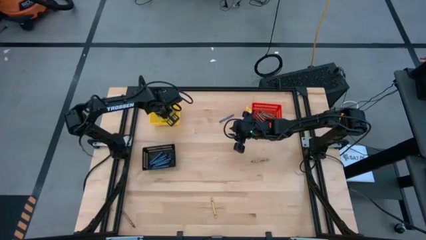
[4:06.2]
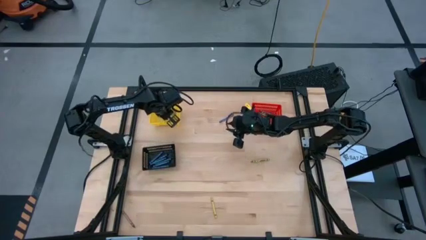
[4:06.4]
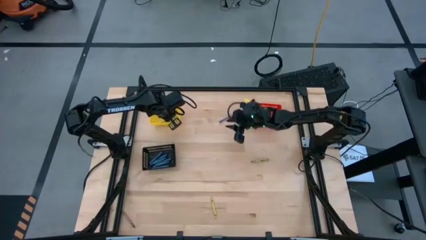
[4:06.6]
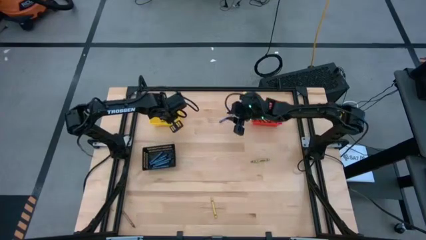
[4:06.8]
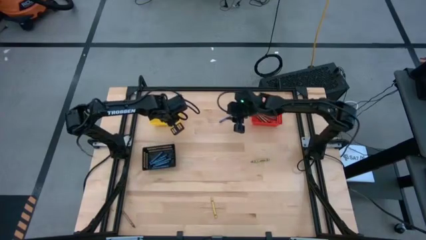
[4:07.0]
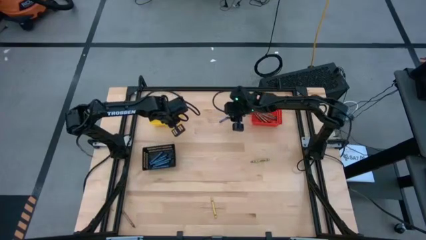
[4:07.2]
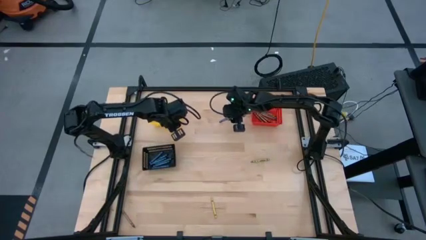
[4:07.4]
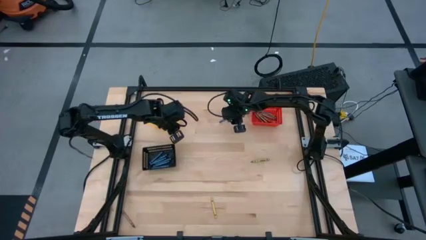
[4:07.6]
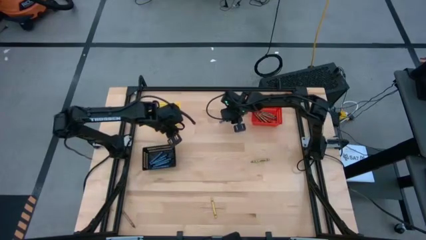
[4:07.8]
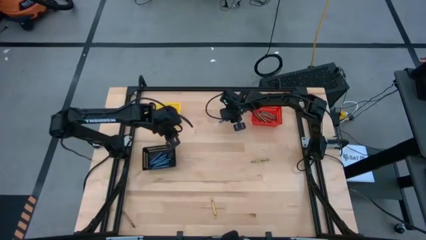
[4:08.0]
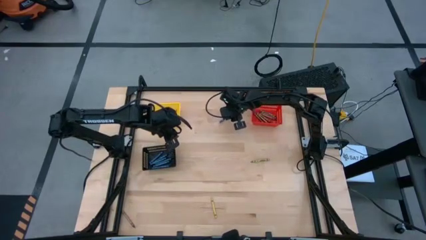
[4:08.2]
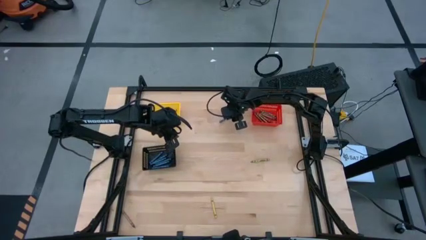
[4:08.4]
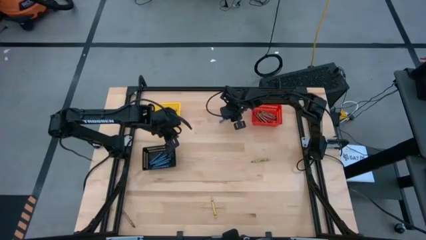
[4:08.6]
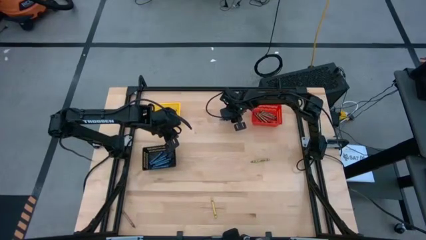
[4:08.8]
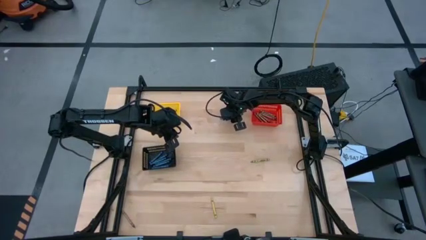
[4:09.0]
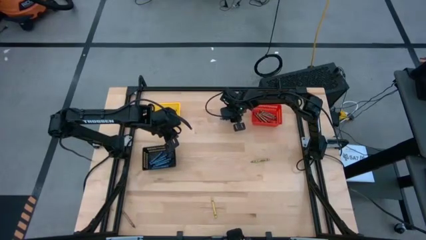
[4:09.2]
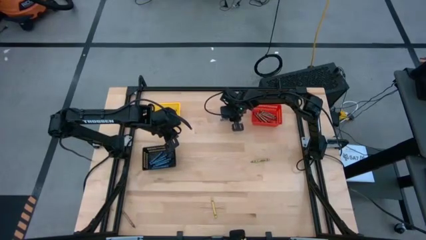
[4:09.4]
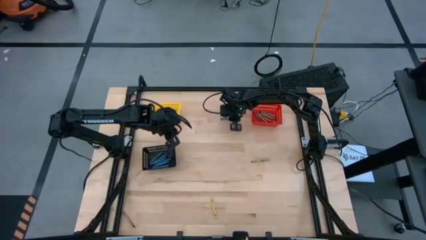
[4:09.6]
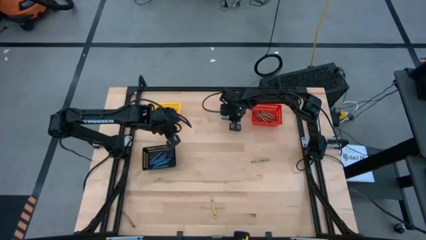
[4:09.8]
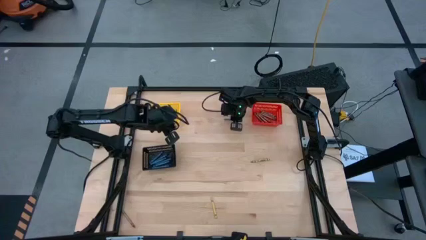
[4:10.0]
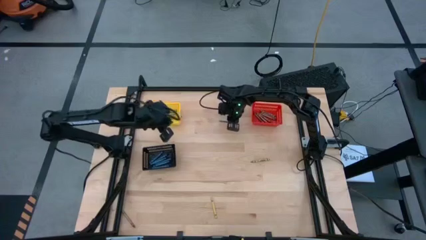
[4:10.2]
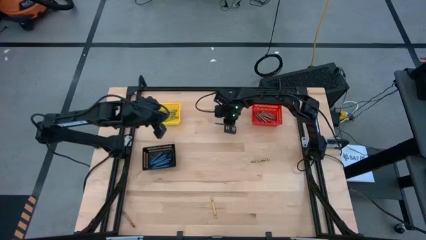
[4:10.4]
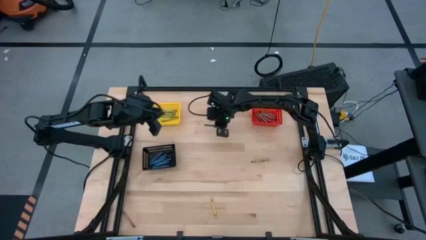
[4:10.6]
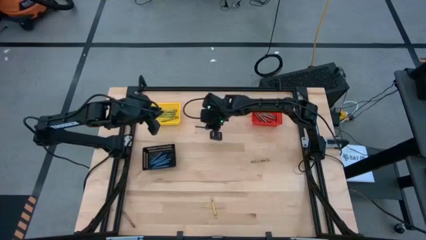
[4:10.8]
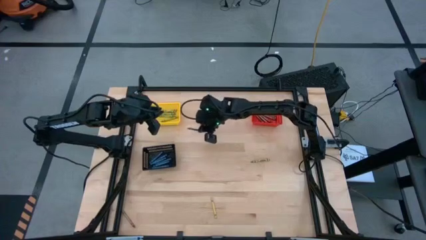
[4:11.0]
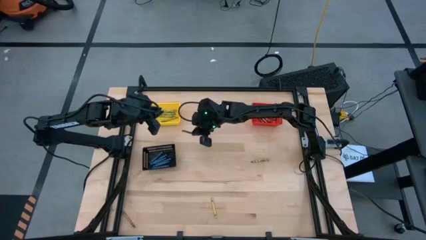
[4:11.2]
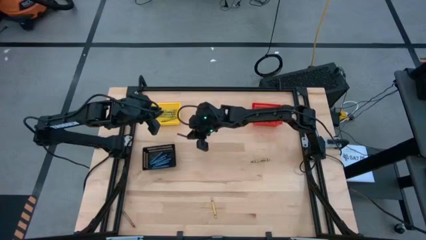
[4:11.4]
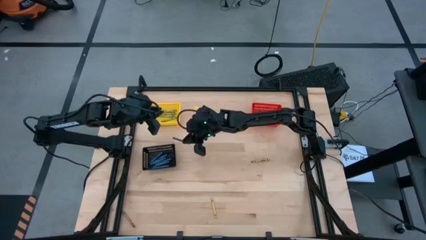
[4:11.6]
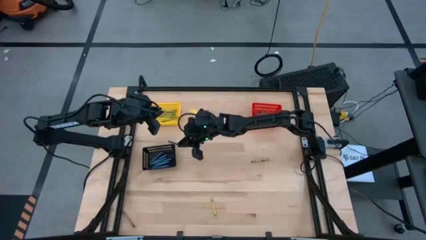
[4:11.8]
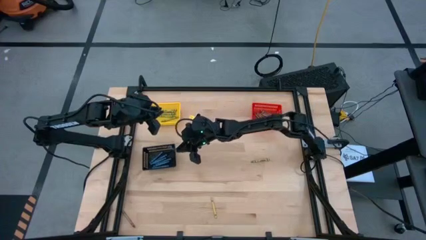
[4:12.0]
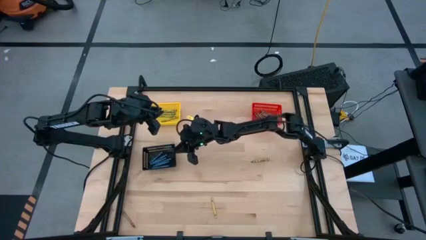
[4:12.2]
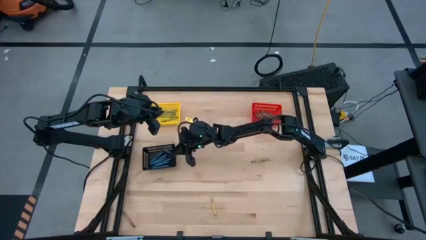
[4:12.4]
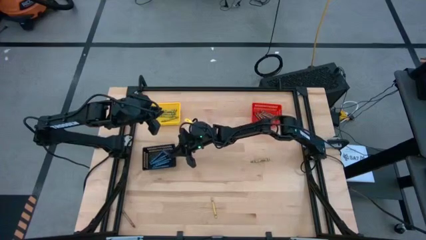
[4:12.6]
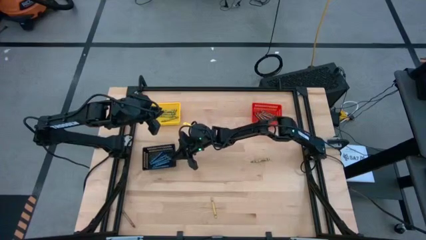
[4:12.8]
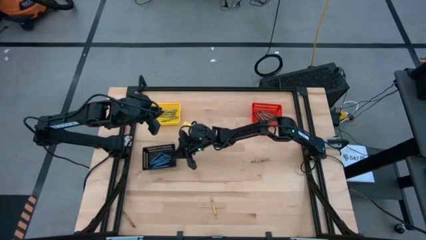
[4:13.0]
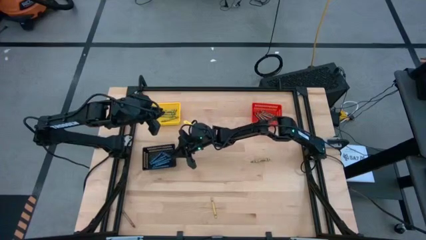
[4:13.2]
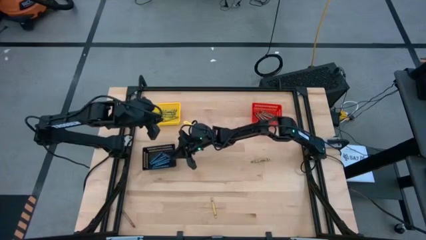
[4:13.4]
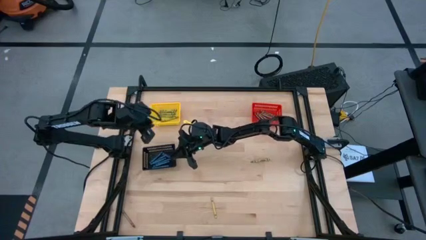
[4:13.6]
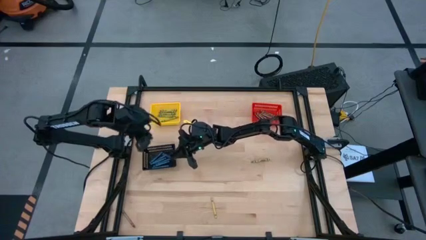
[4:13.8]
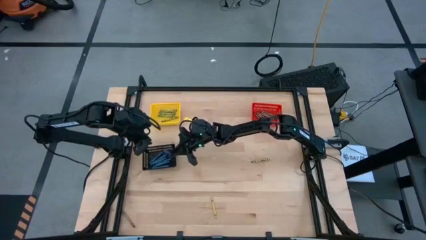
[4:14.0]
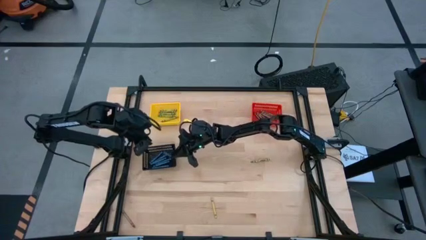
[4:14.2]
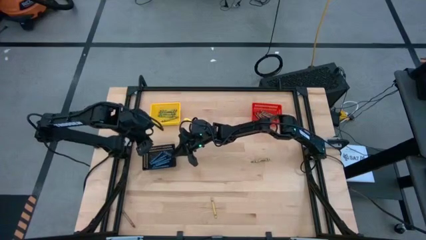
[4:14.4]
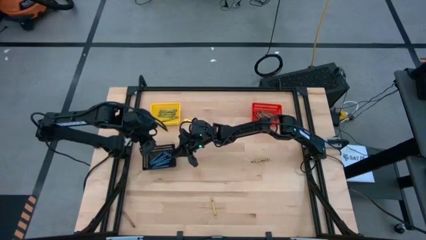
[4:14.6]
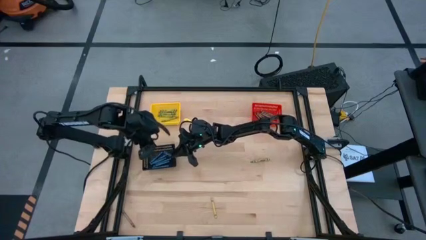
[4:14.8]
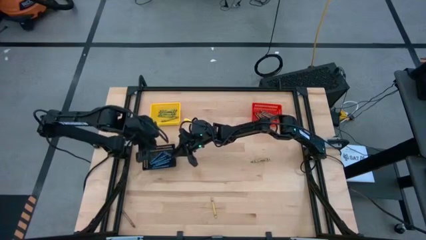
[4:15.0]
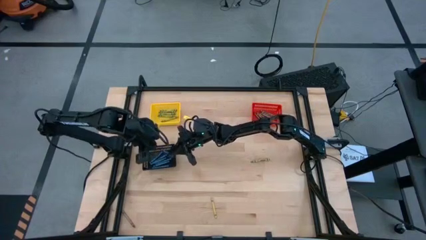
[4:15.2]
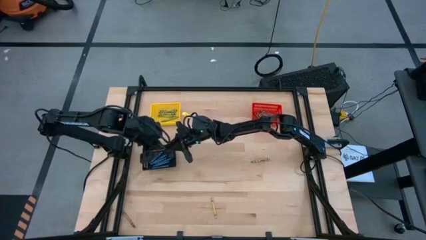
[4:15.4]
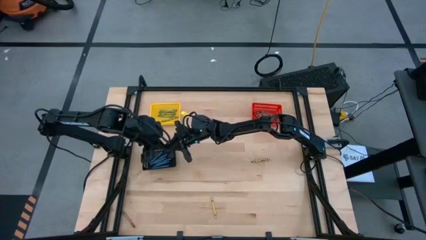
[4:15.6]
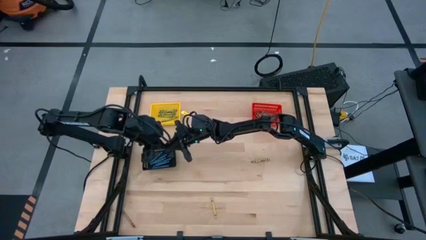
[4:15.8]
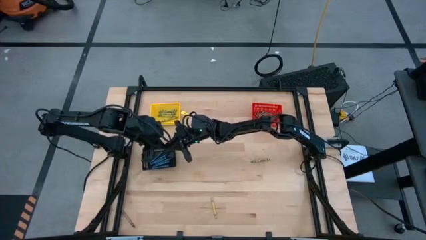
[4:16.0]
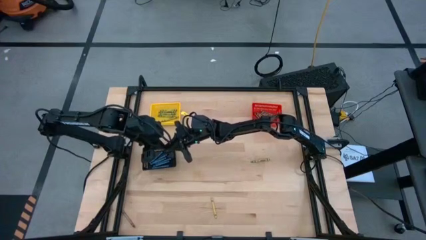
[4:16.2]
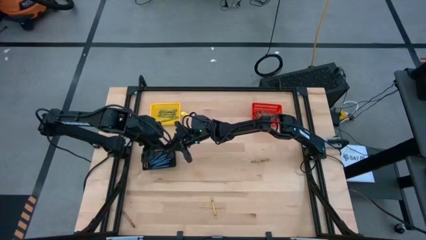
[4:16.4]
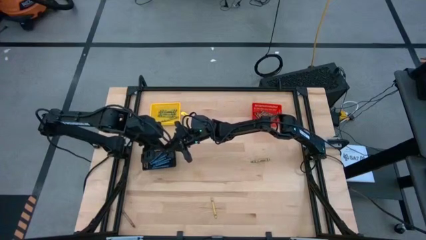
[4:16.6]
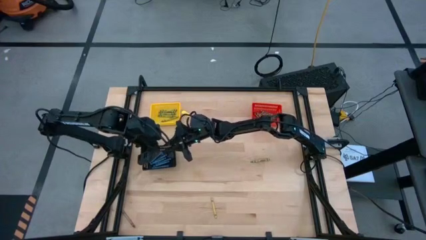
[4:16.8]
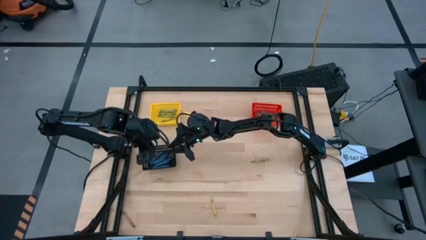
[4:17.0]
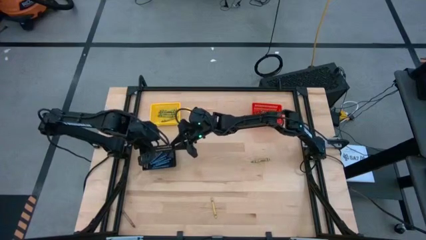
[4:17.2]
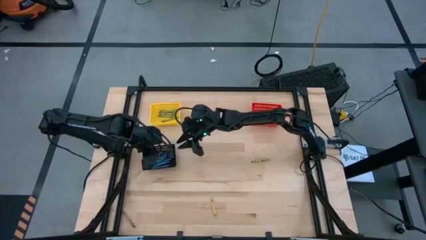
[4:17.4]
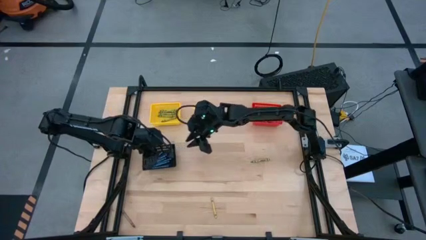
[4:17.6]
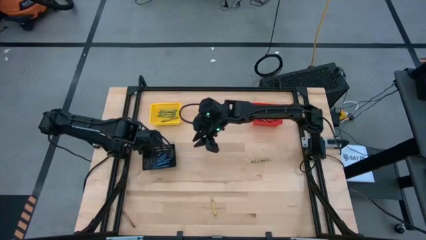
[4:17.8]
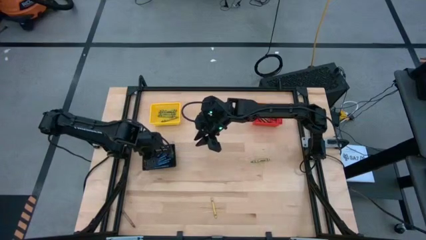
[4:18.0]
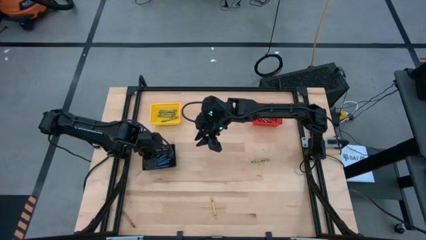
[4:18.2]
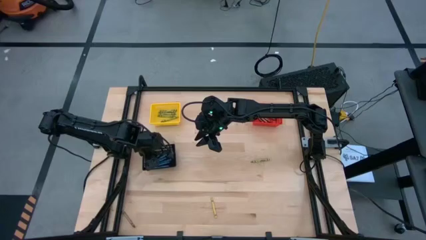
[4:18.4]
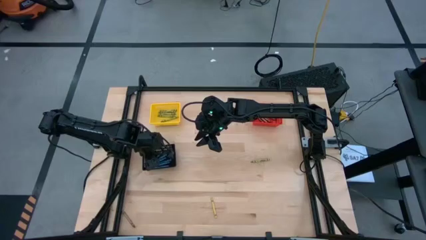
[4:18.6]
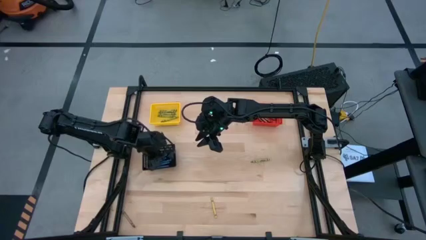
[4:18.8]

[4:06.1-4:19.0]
Task: Sort crayons
Put the blue crayon into the black bin

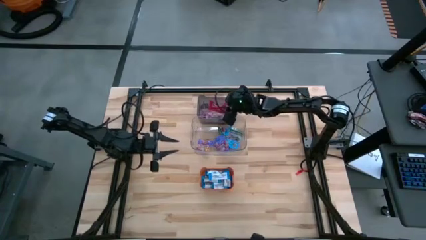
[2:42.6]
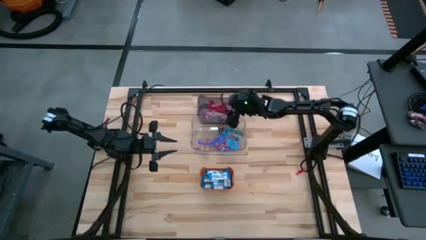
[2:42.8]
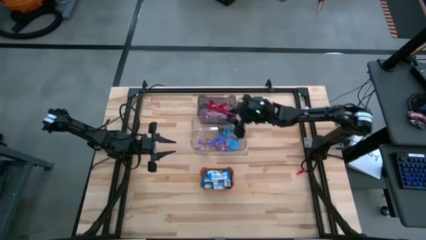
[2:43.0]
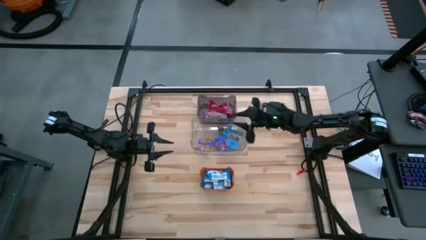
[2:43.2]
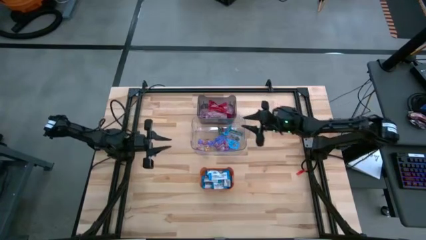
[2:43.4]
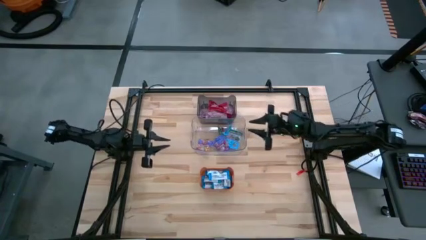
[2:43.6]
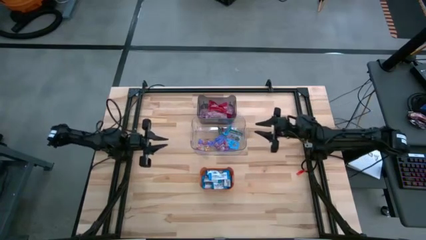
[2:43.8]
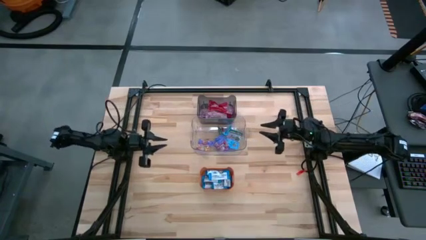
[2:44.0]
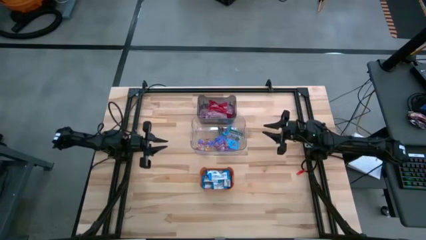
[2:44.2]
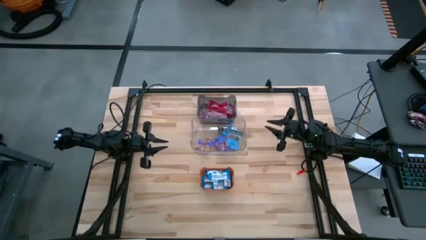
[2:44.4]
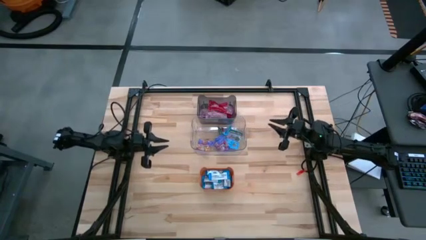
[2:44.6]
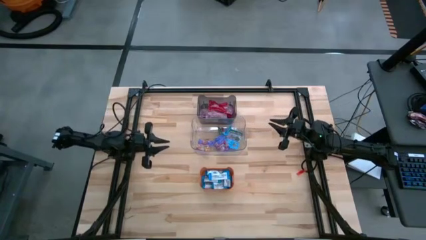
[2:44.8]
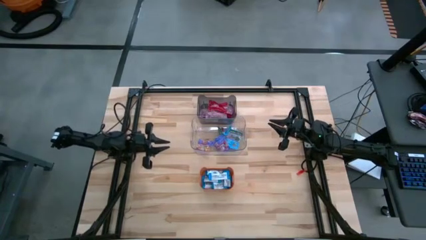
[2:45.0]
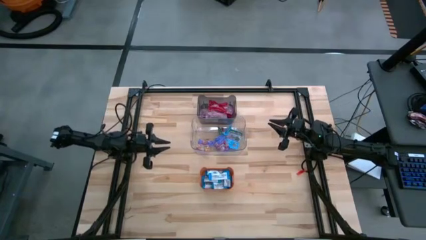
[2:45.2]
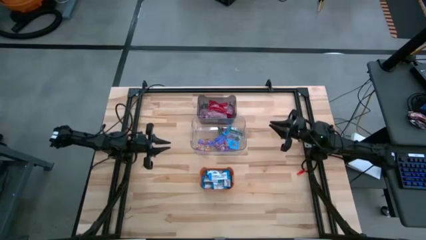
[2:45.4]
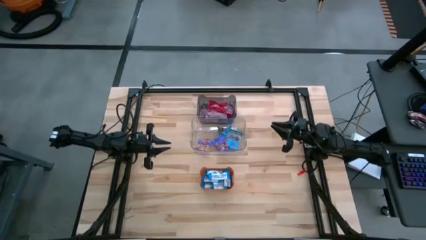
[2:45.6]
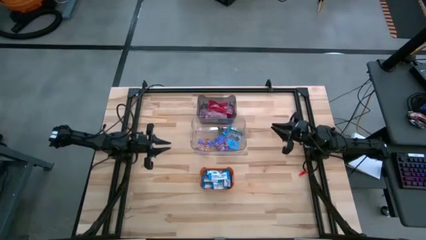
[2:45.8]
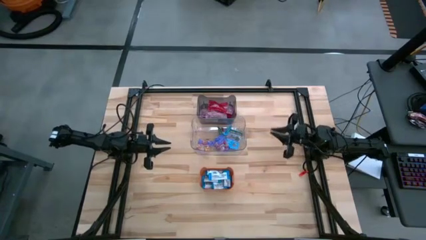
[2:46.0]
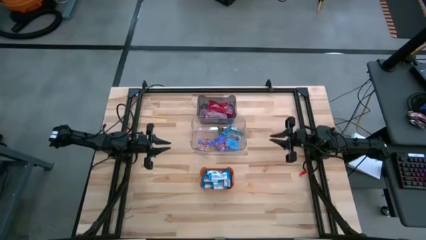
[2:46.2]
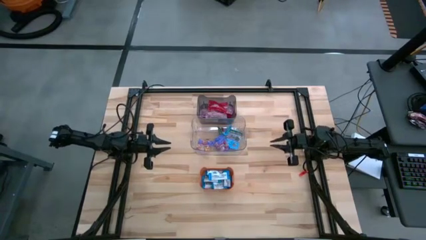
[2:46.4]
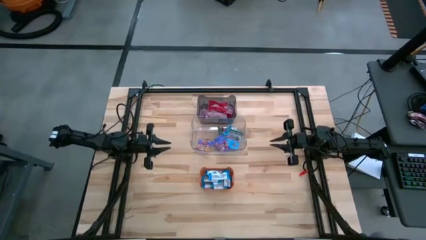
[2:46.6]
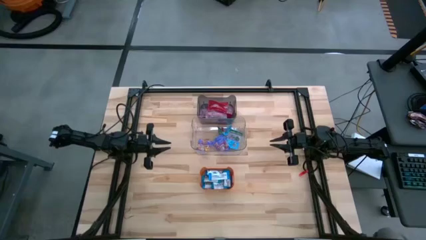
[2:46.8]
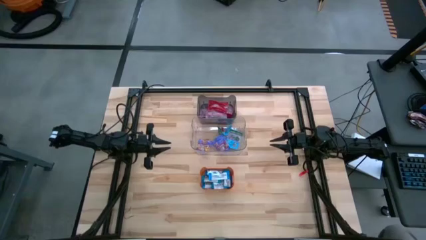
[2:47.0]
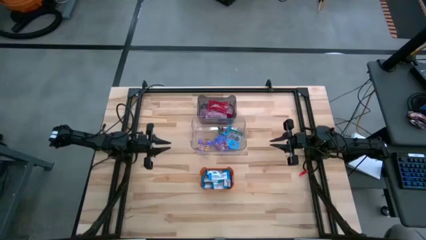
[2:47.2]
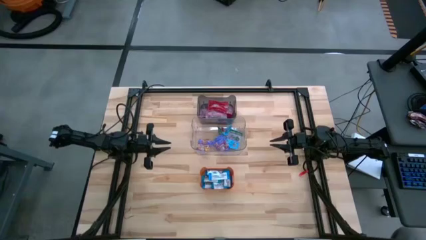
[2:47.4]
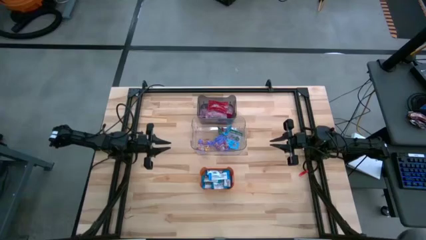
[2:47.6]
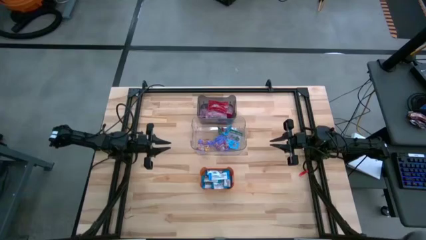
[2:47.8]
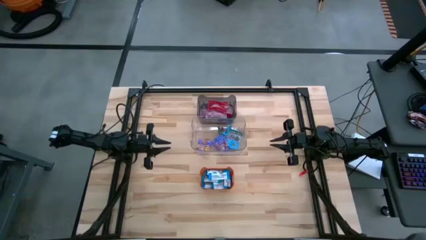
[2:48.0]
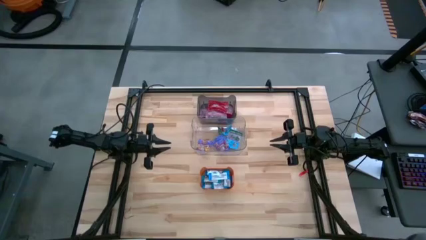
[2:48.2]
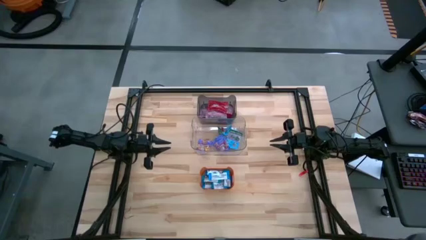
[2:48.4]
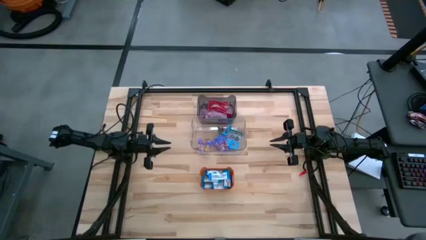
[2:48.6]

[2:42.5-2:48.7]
Task: Sort candy
Return to Home Position
